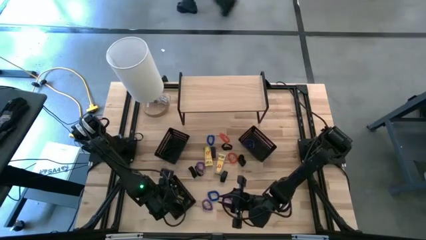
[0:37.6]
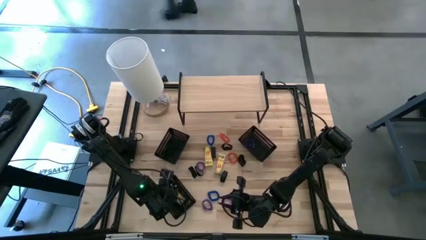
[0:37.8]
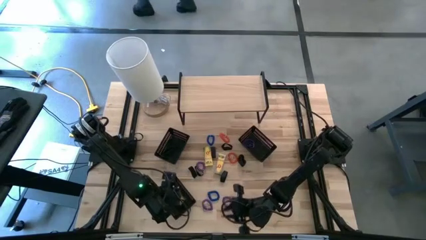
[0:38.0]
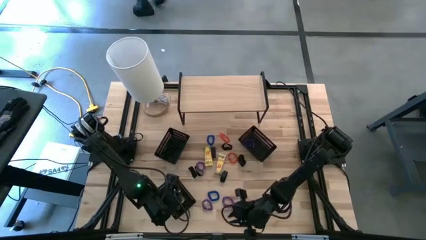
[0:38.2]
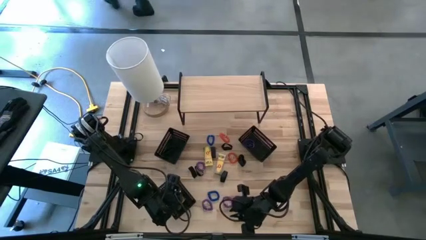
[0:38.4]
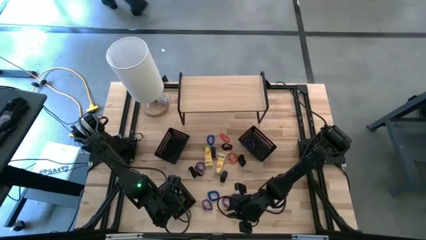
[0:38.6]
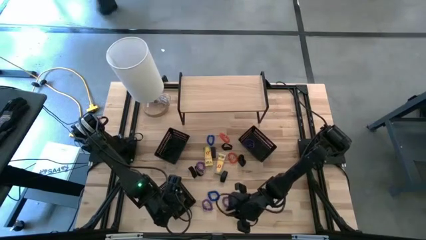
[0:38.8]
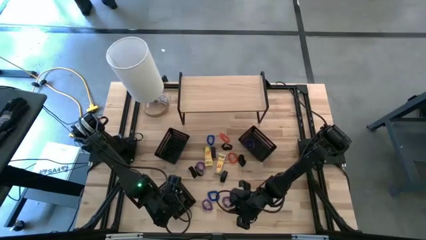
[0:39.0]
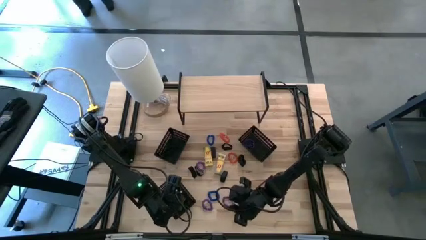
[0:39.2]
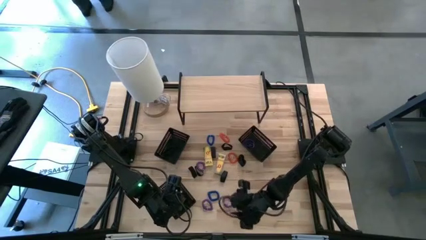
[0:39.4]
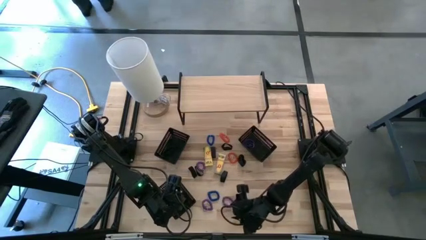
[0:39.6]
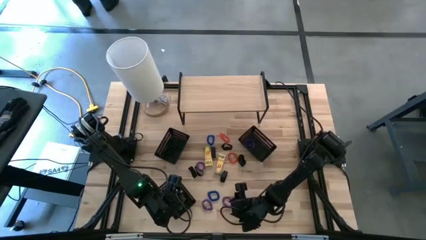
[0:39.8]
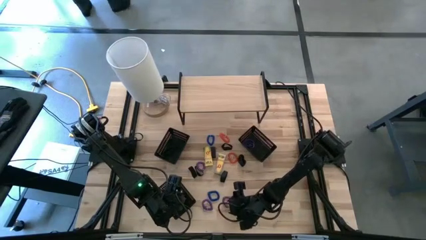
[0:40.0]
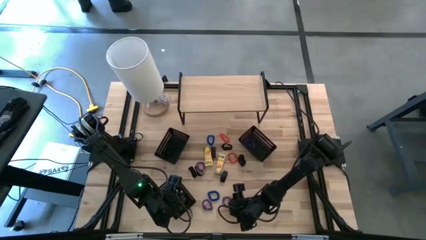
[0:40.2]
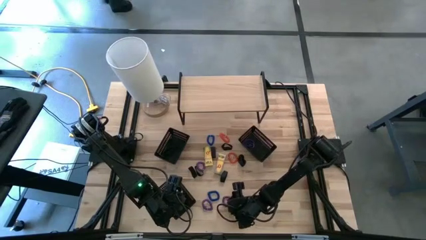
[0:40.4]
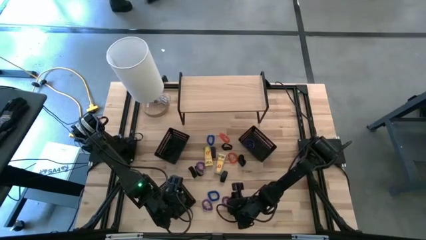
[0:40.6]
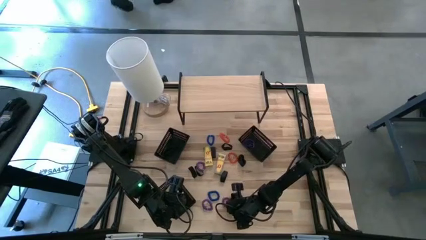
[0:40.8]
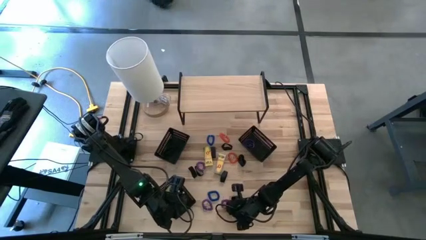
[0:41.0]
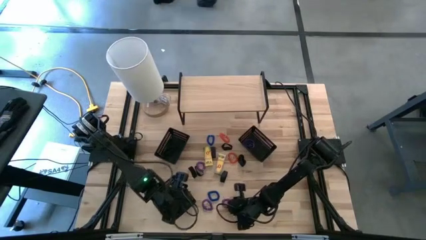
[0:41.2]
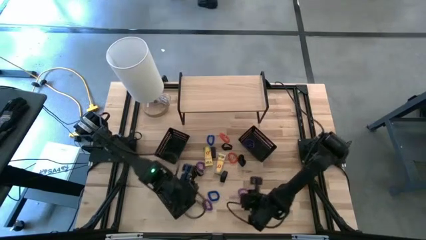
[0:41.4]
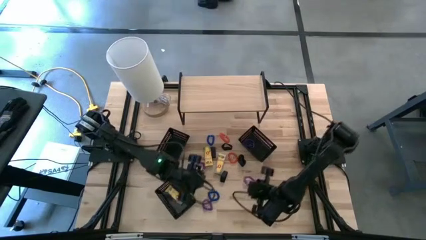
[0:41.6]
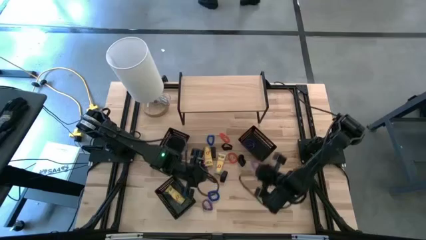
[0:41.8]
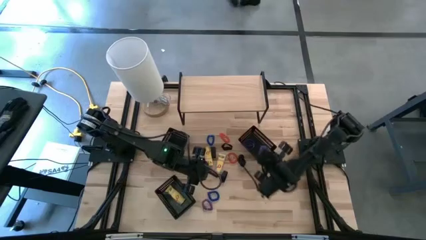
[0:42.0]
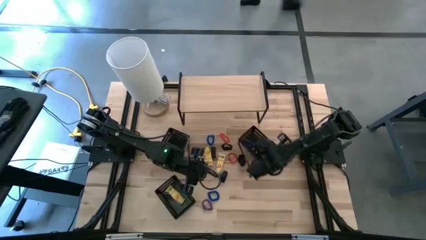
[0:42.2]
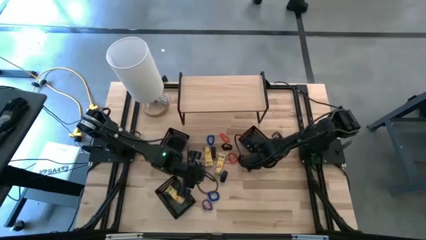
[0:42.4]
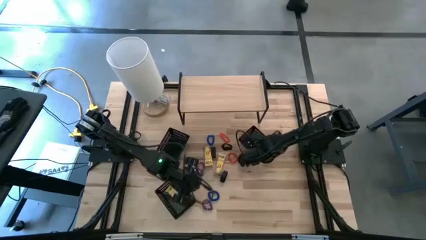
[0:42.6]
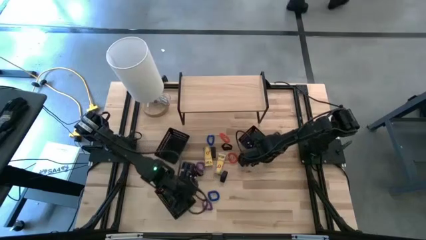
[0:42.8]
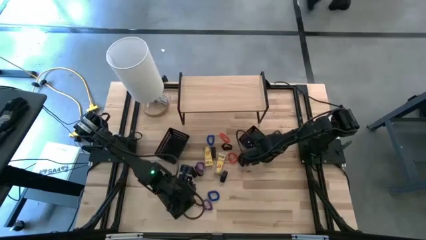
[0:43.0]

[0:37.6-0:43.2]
Task: Pick & Place Office Desk Supplies
Put the bottom right purple spring keychain into the top right black bin

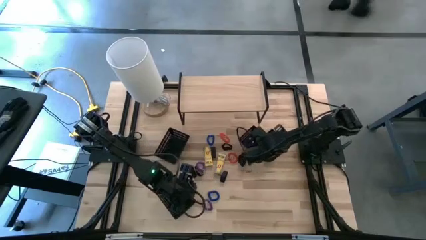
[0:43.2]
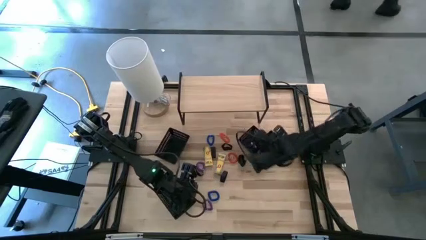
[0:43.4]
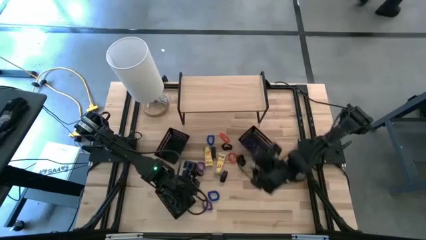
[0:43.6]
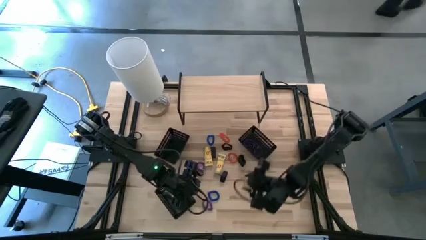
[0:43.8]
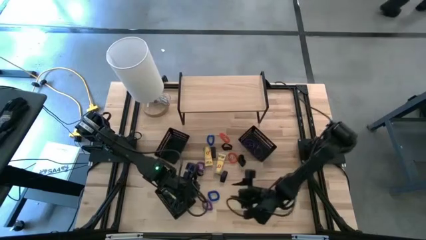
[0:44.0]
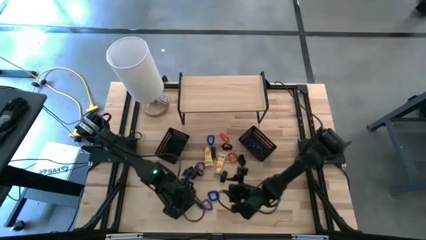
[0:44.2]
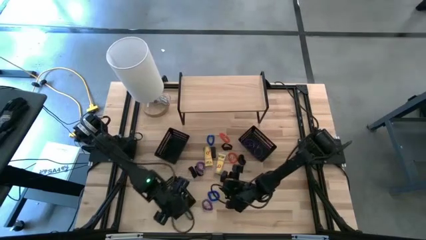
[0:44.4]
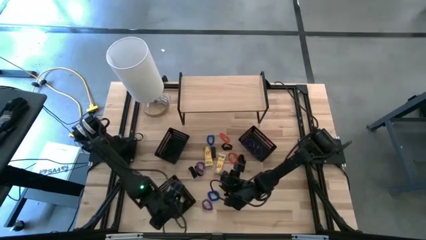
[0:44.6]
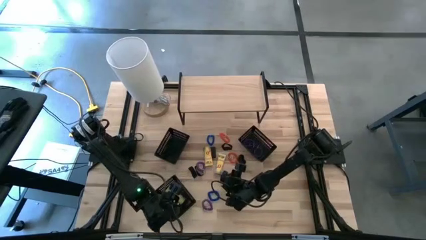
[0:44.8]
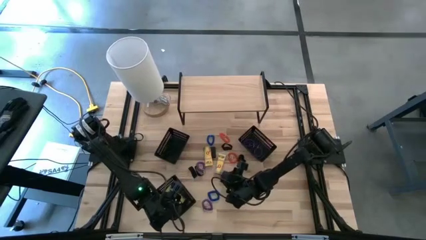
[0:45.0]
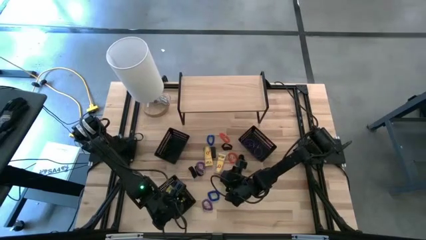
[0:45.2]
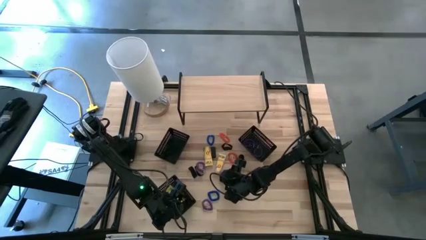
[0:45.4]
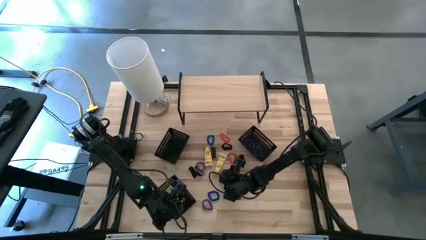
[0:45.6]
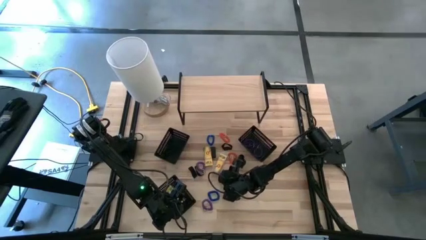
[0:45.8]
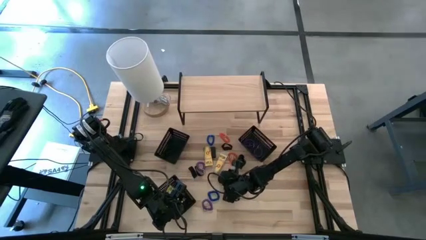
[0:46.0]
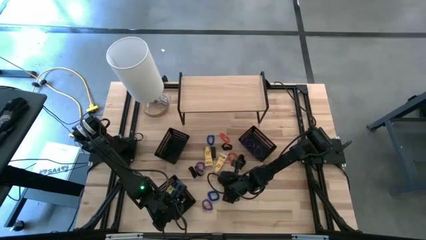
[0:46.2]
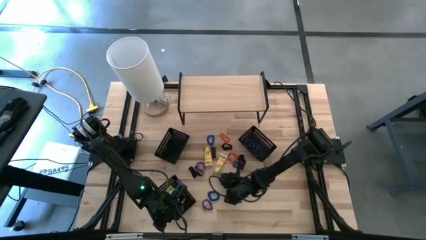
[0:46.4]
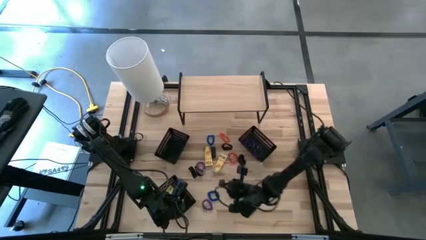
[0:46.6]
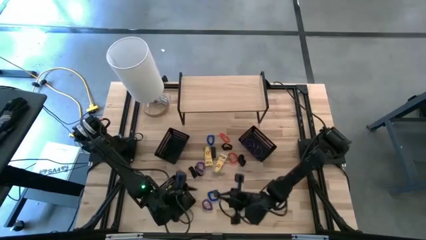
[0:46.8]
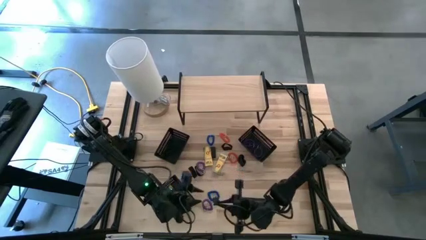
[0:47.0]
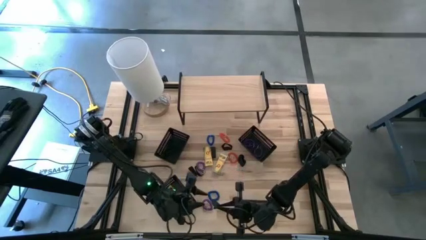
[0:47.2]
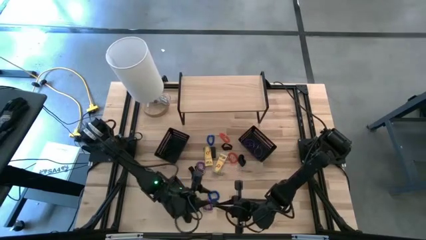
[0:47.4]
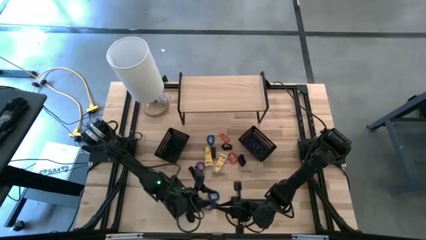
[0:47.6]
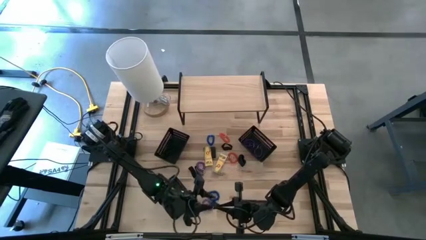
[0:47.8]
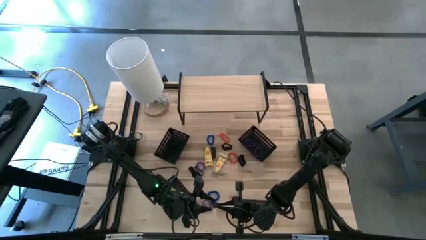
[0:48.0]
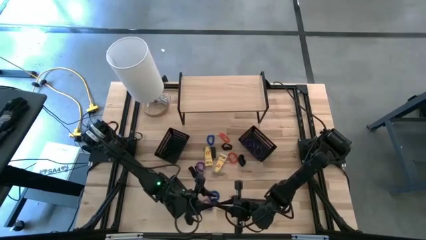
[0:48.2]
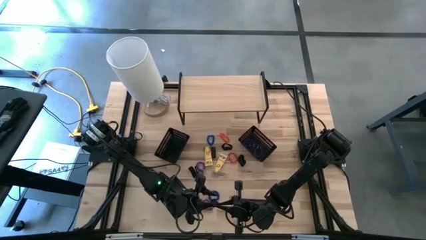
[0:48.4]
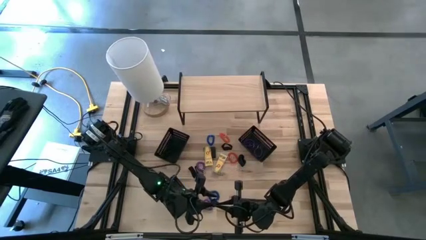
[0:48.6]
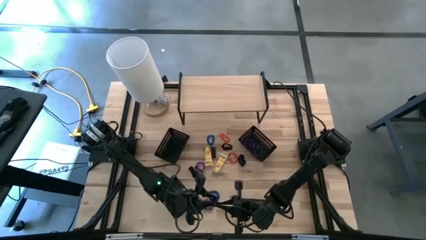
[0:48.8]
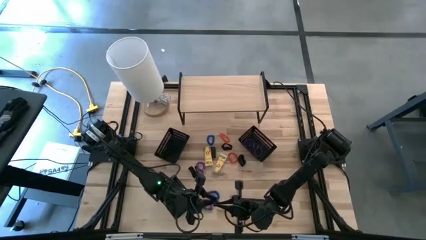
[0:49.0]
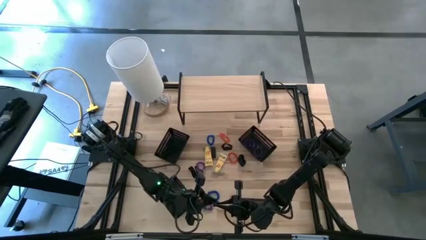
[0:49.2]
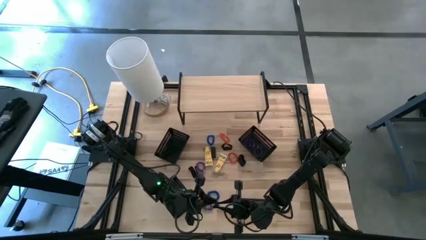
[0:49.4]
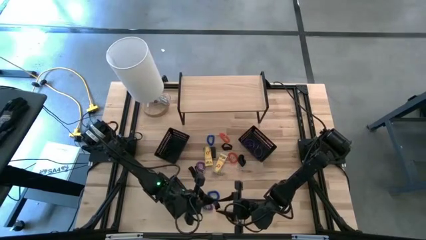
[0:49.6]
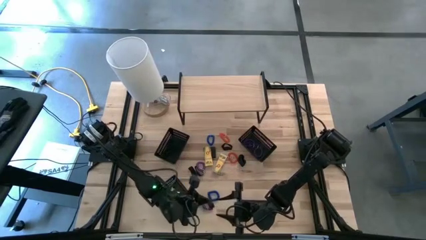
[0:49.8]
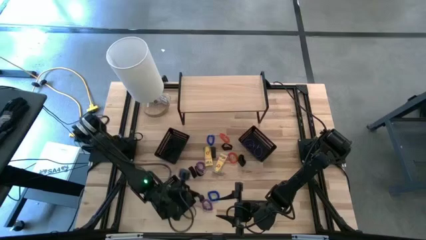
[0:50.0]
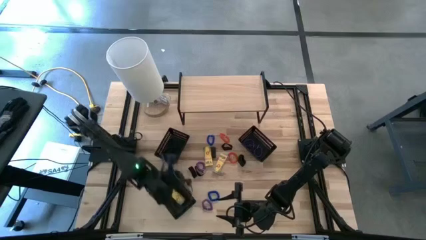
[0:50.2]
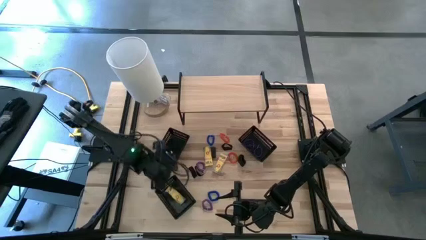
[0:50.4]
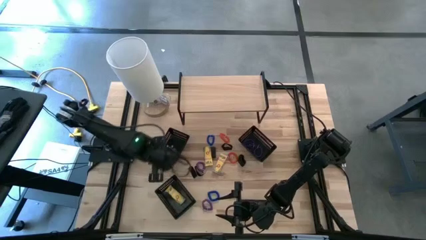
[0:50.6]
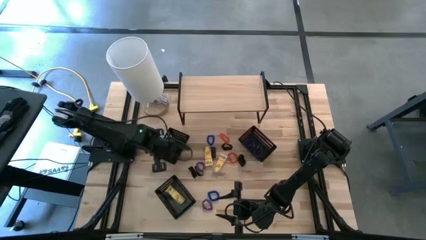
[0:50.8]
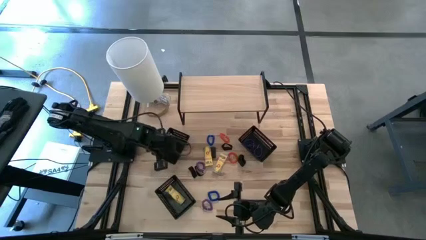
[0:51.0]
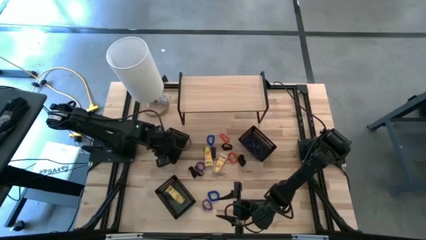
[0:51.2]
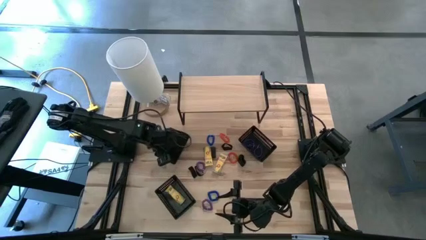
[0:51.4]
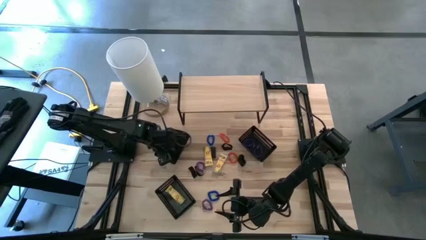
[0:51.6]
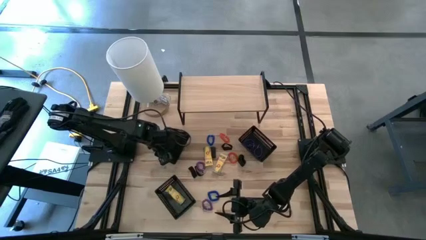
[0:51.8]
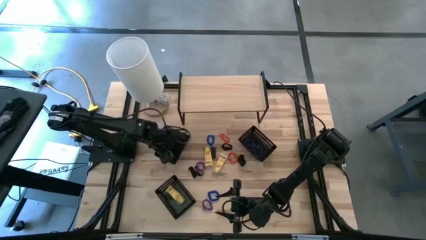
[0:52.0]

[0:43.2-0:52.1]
Put the black rubber band into the top left black bin
